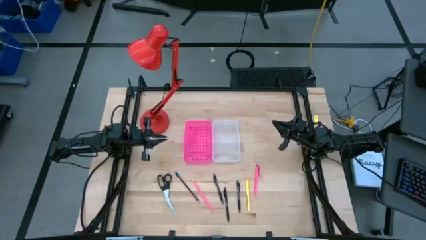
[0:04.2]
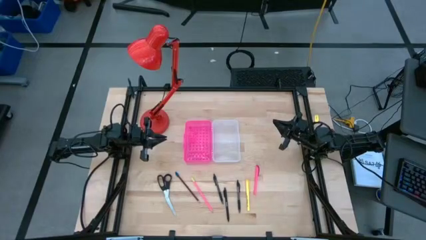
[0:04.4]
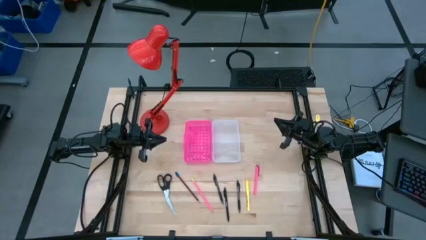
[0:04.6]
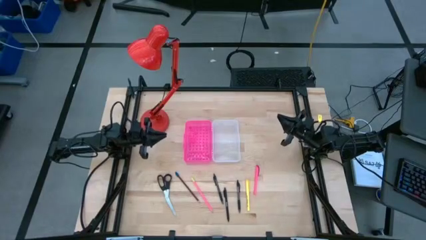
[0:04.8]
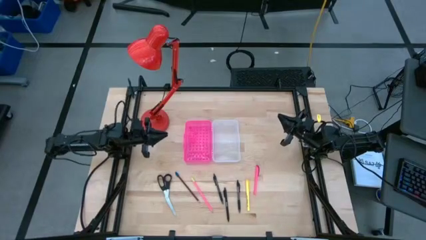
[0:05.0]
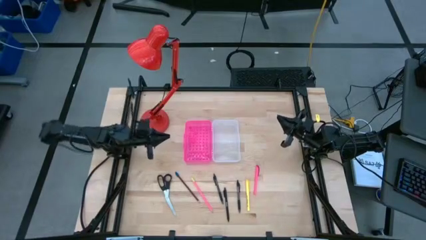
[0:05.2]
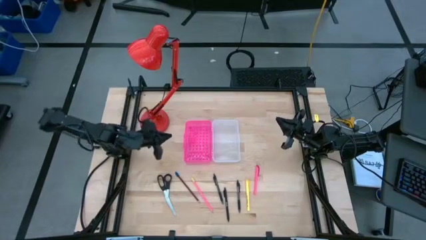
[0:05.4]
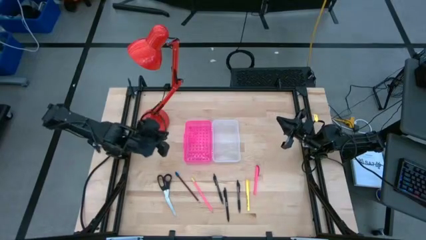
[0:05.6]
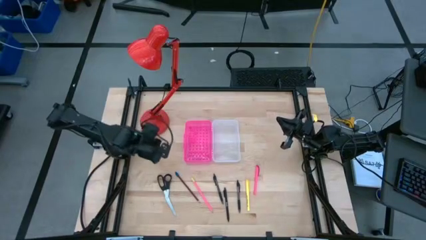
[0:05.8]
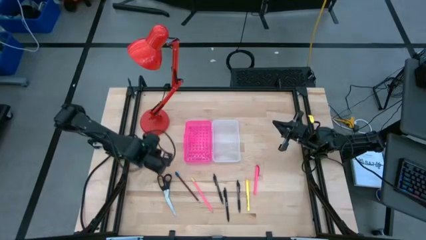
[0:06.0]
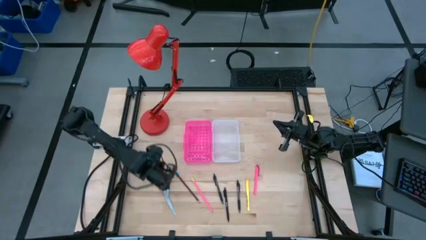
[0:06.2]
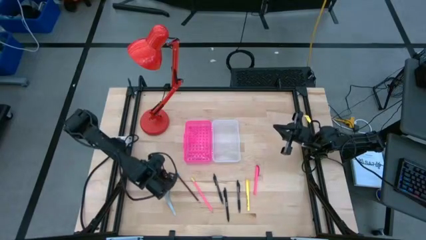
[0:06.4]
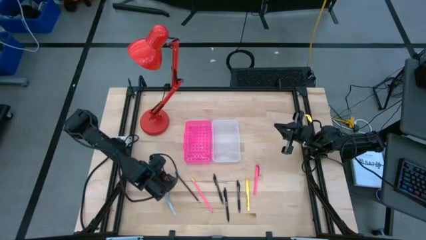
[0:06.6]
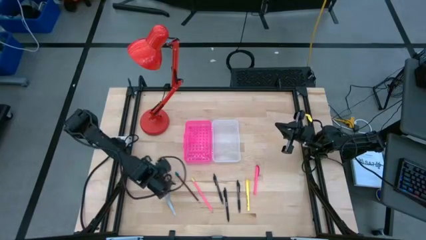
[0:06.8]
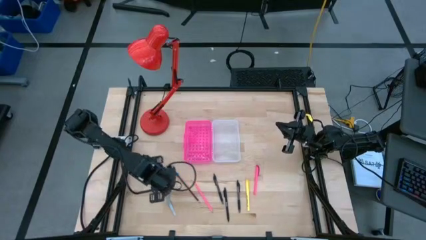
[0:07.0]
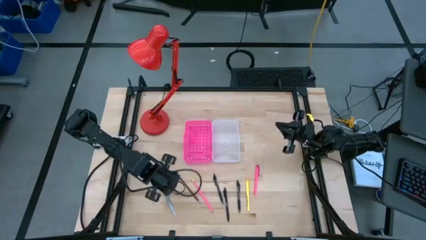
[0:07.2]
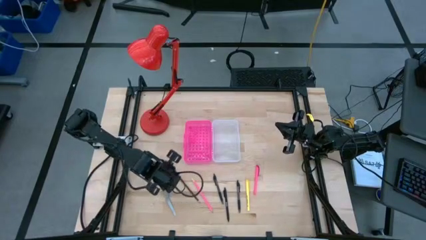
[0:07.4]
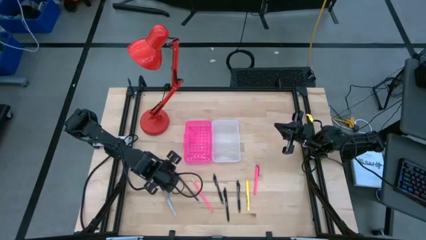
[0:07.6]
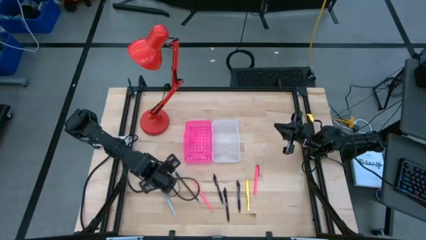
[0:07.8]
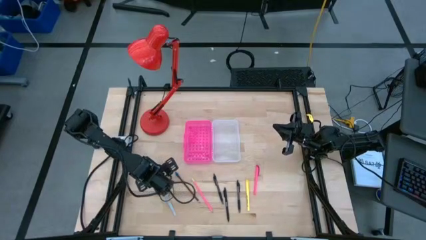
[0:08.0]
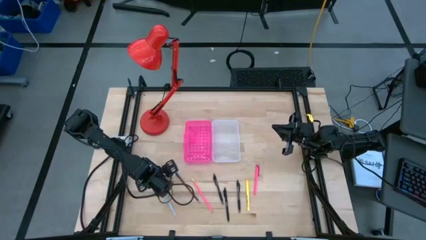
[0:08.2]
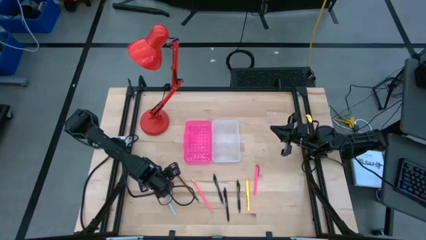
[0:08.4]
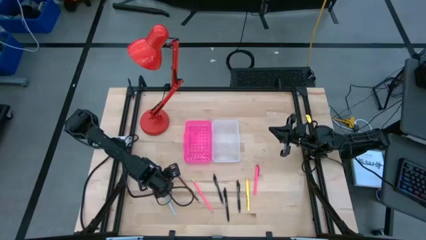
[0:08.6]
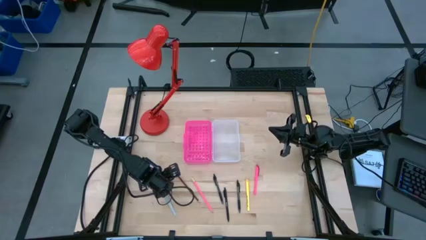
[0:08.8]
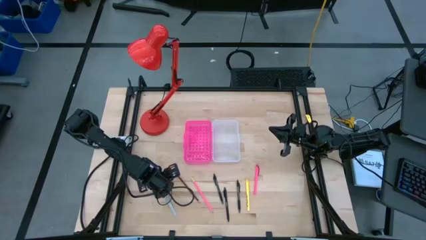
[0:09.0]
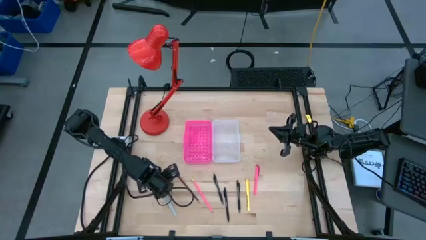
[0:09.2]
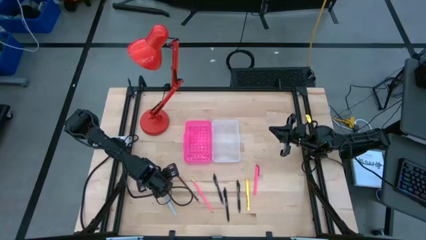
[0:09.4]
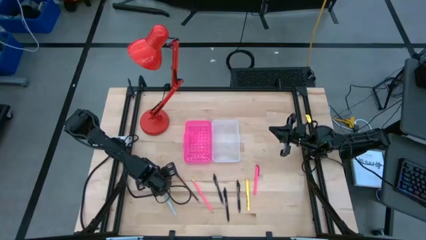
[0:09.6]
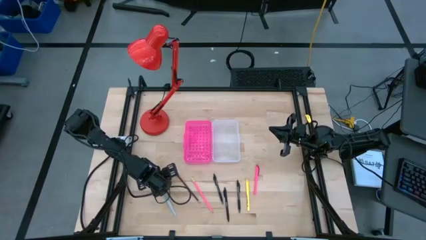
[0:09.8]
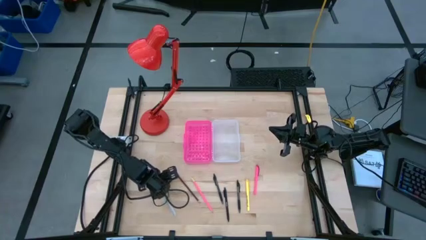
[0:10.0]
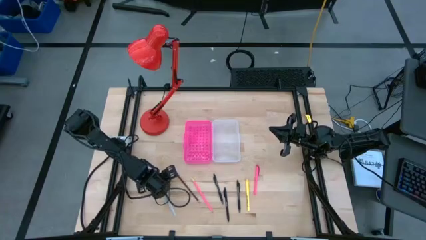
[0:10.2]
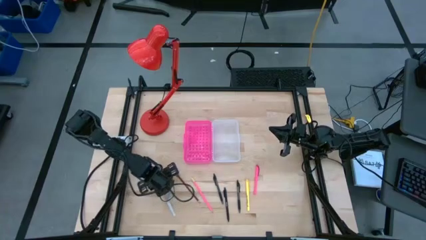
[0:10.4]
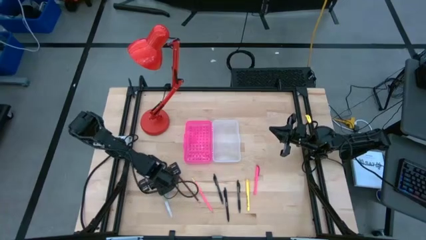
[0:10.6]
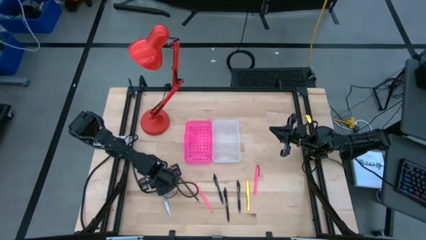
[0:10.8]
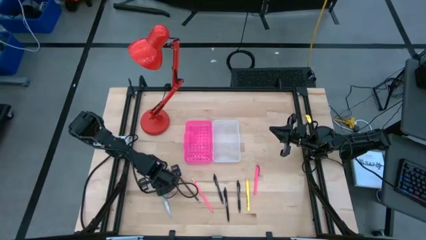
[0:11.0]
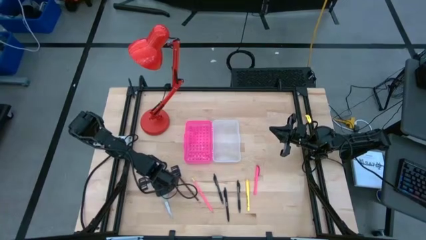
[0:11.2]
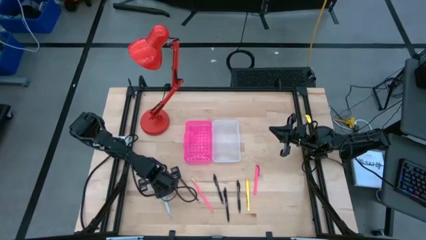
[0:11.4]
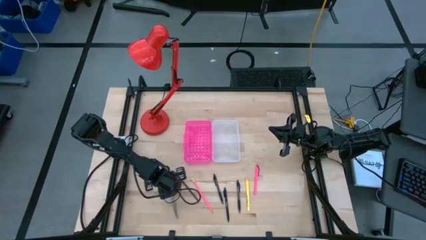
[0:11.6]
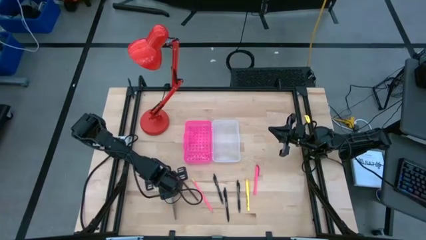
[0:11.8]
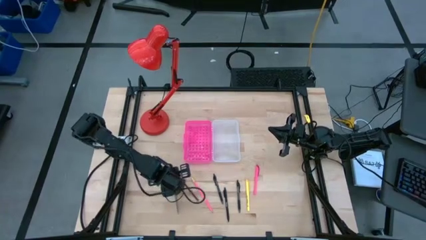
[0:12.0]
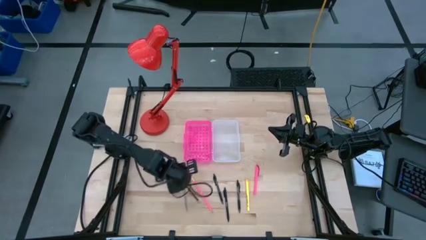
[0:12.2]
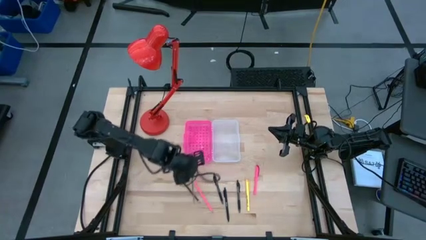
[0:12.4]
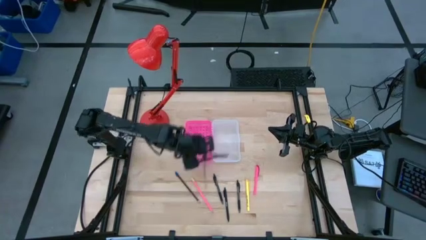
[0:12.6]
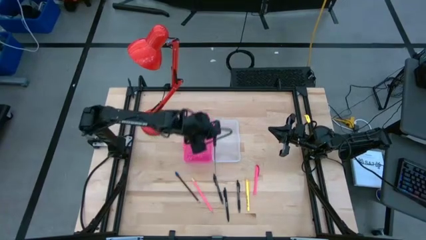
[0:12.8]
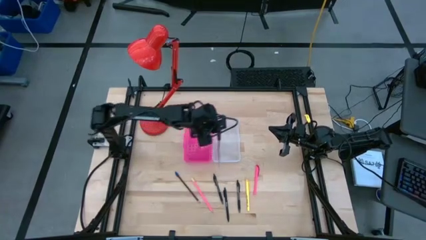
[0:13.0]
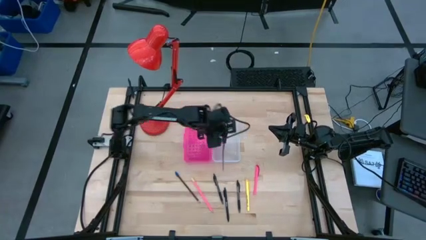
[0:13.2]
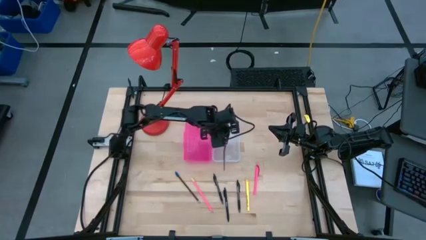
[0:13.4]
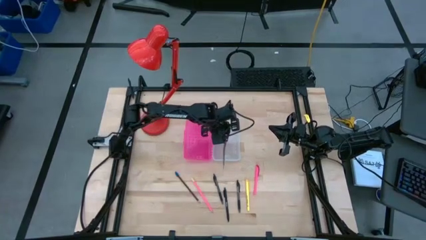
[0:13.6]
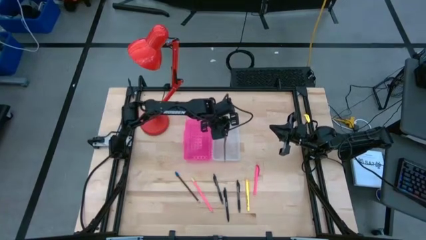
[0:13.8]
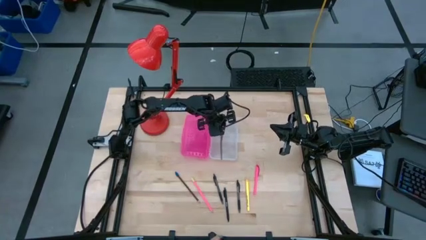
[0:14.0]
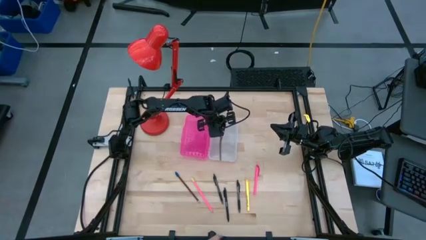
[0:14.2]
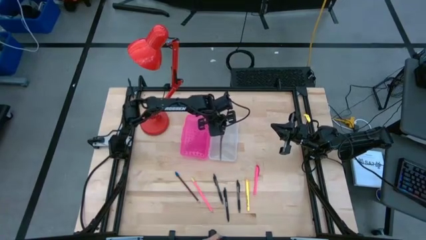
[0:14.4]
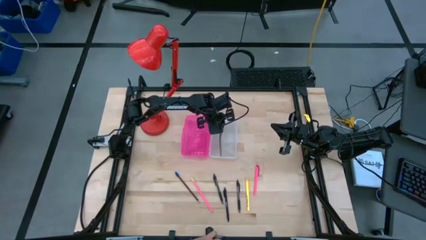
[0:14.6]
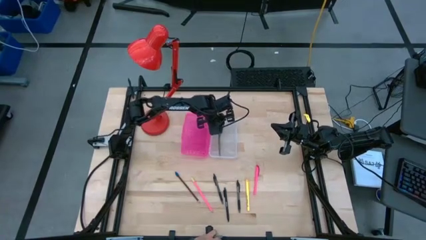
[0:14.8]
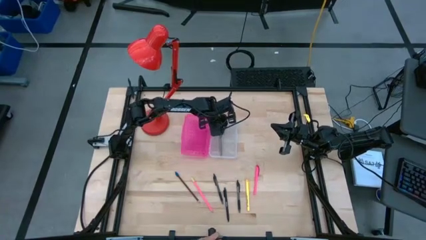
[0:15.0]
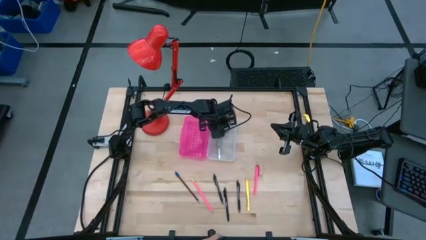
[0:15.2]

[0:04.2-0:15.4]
Task: Pick & place school supplies into a supply box
Put the black scissors into the supply box

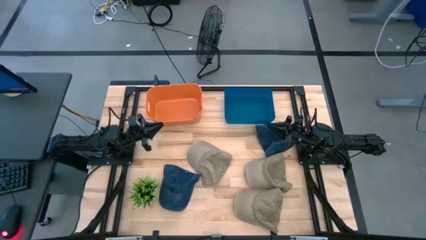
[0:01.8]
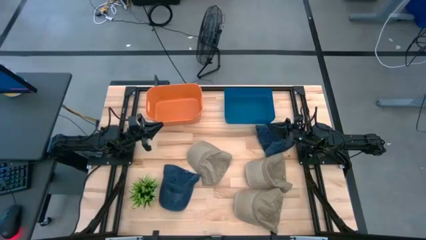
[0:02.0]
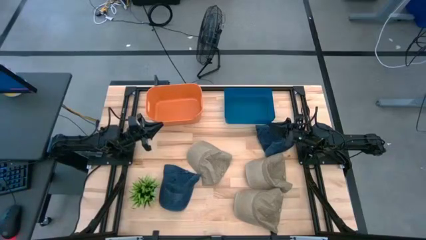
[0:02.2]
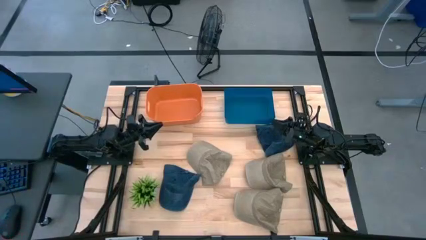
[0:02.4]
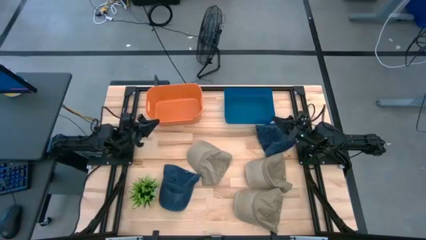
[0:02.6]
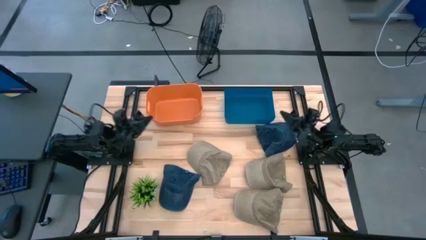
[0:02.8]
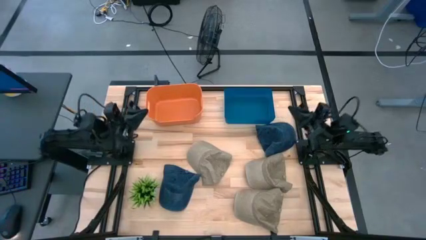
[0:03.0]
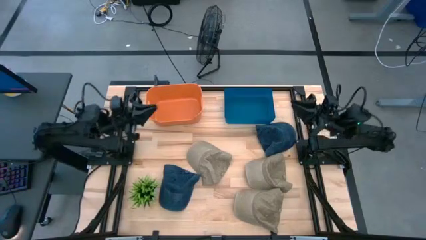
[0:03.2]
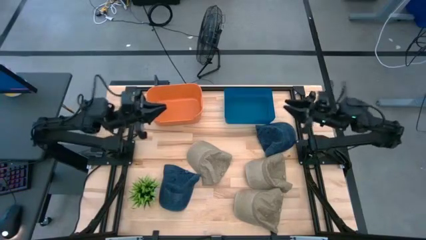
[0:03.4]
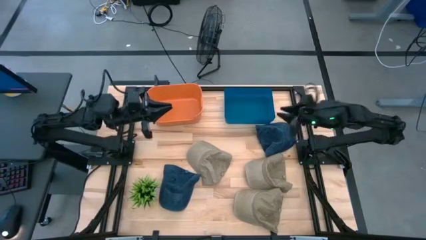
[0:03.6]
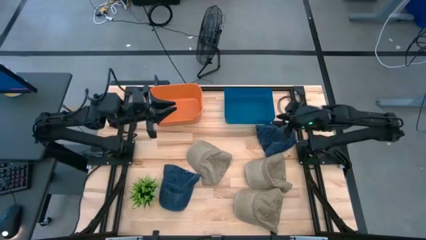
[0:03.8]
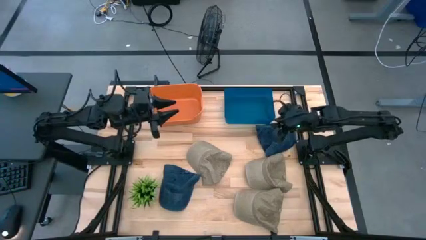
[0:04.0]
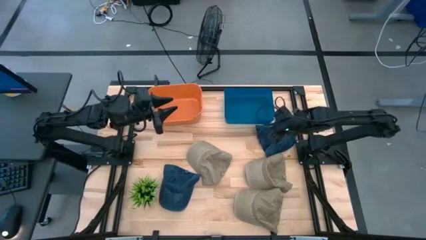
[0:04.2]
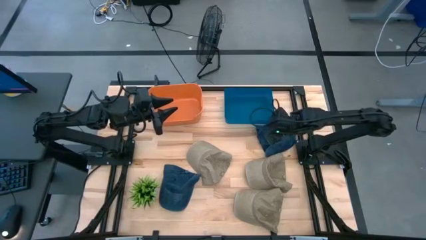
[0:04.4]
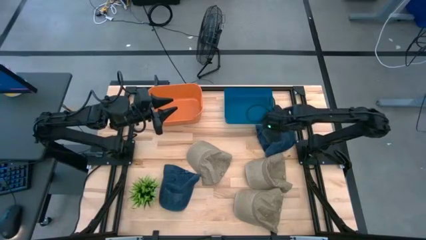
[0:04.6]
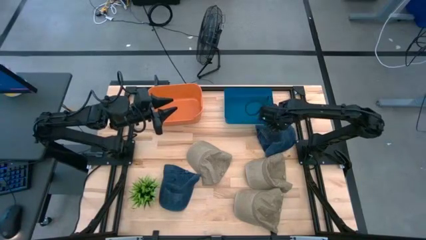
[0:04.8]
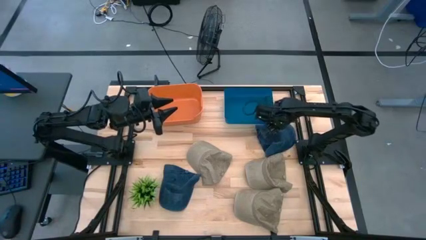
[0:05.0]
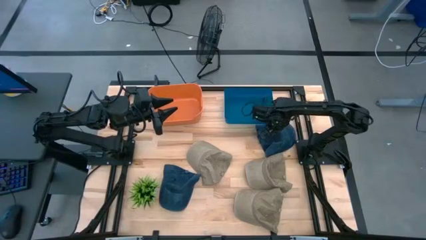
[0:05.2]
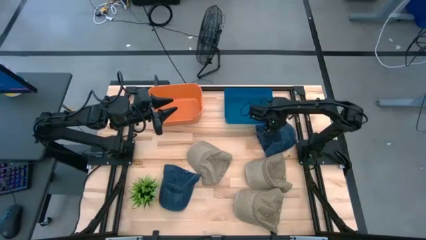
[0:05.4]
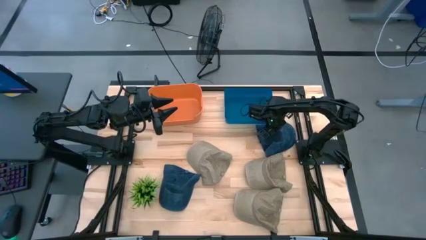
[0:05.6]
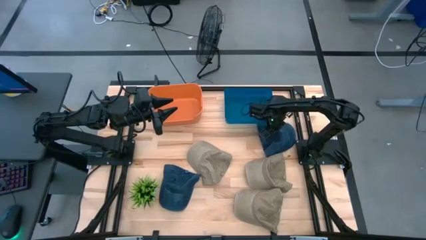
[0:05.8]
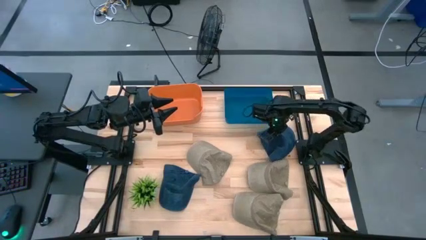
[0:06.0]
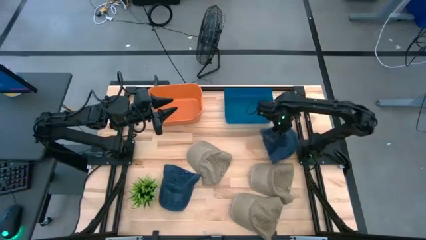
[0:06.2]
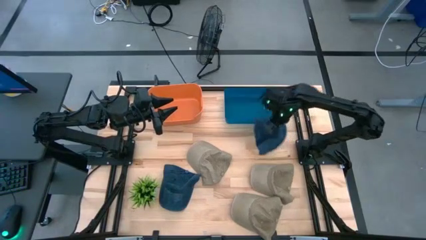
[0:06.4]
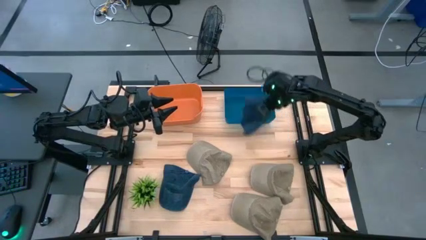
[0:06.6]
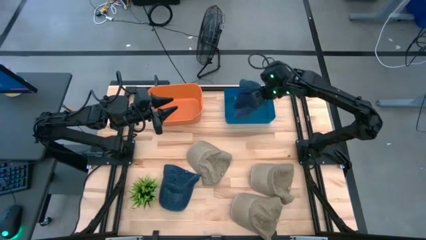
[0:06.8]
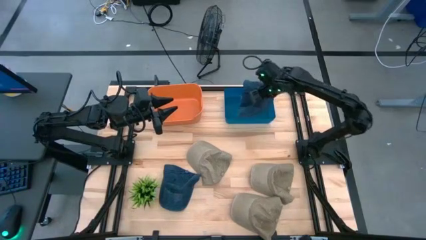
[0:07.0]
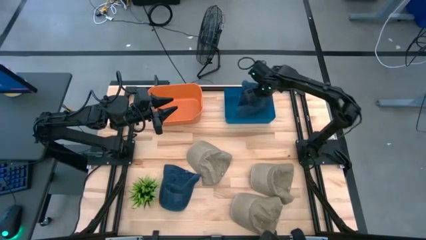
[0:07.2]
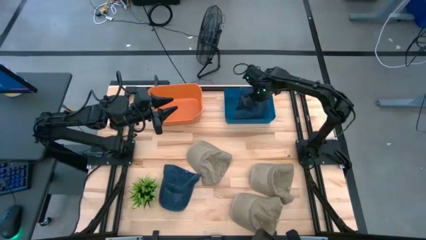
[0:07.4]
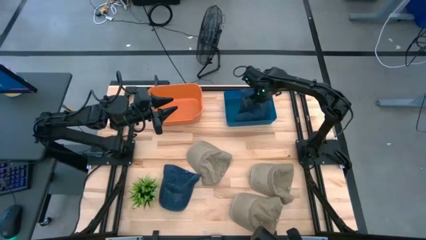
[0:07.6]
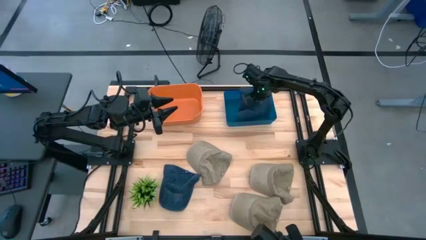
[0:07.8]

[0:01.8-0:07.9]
Task: Pick & Place hat
Put the right blue cap into the blue bin
